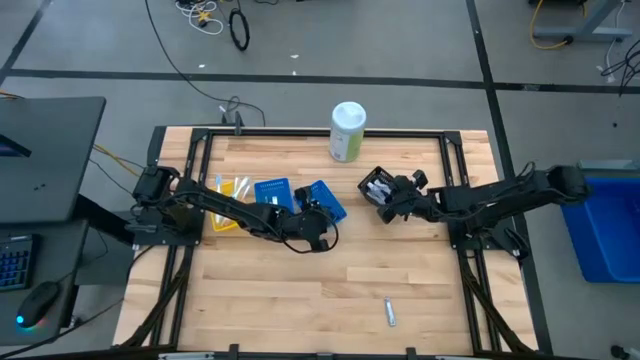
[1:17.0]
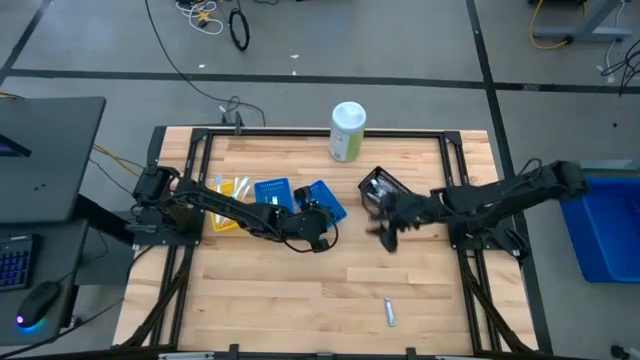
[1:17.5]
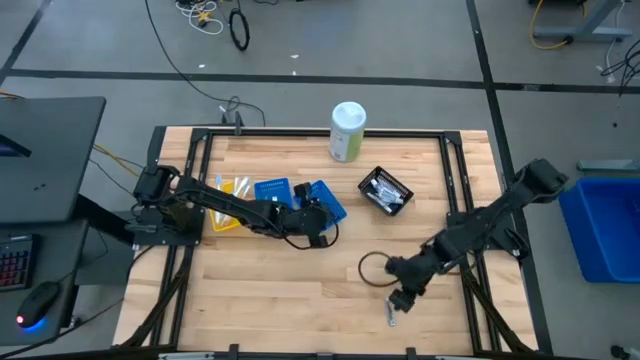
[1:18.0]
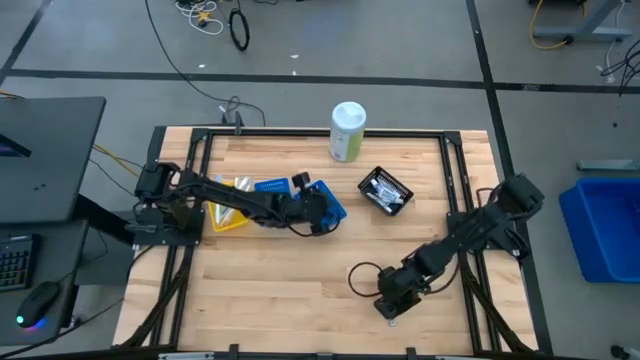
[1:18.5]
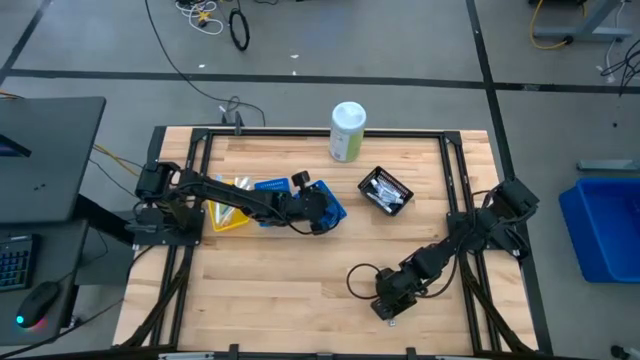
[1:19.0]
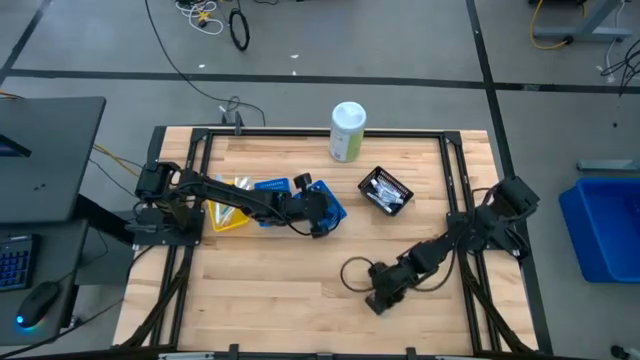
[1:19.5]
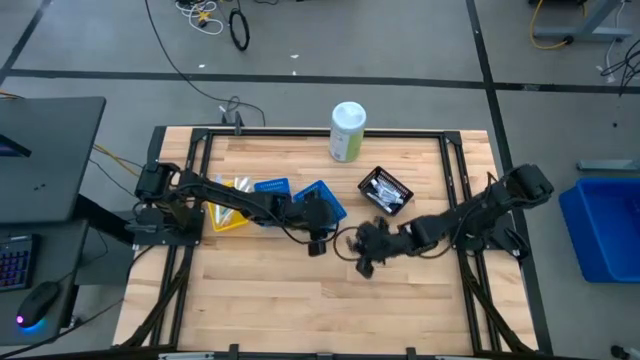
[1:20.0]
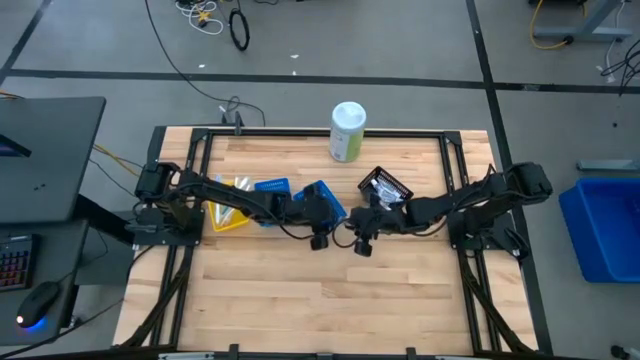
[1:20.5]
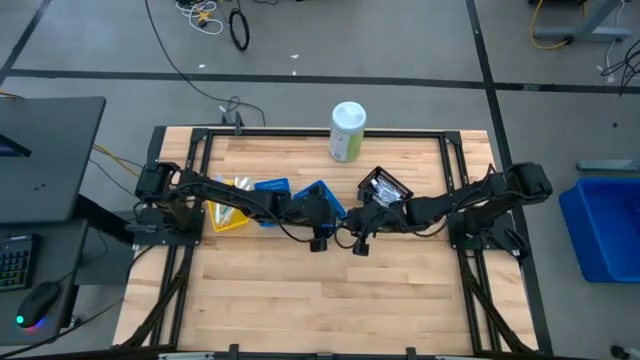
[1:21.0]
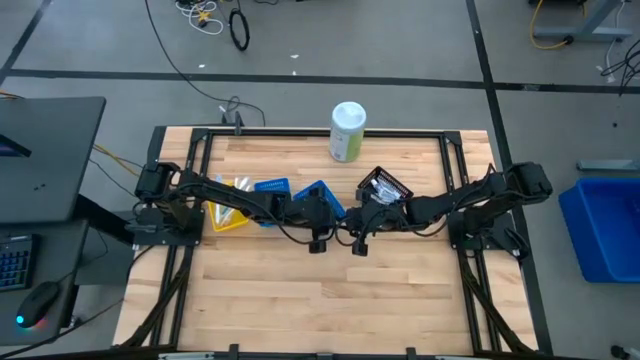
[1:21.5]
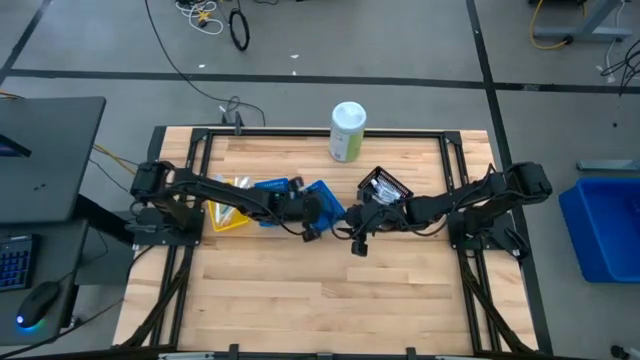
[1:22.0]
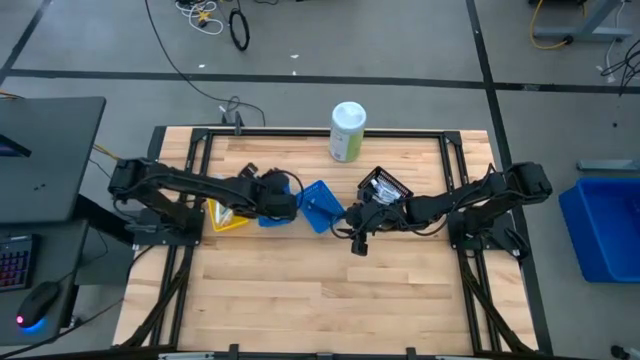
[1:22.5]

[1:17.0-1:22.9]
Task: Pick & Place Travel size toiletries
Put the silver nail cutter into the left blue bin

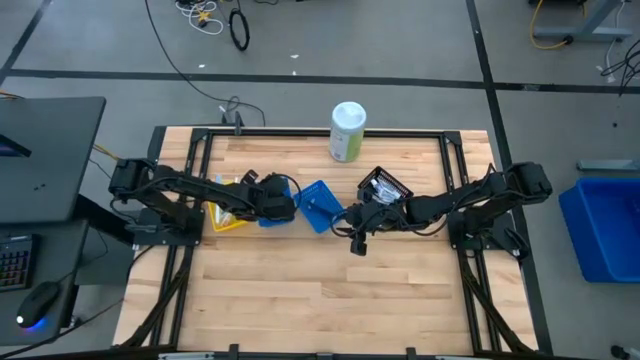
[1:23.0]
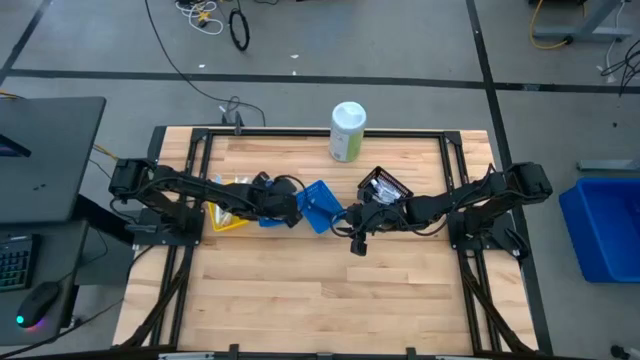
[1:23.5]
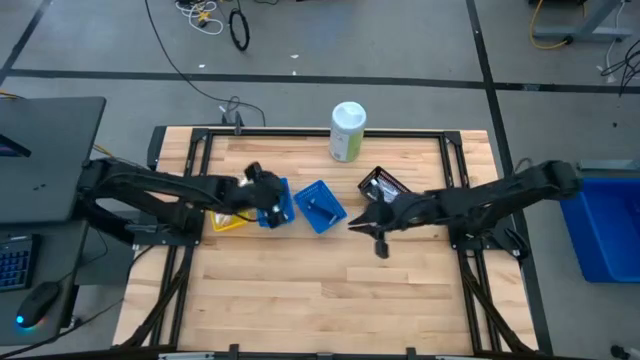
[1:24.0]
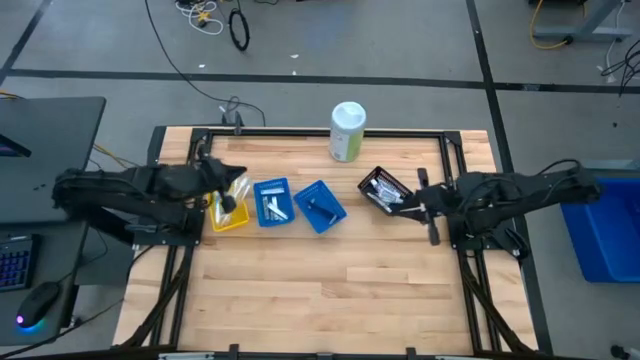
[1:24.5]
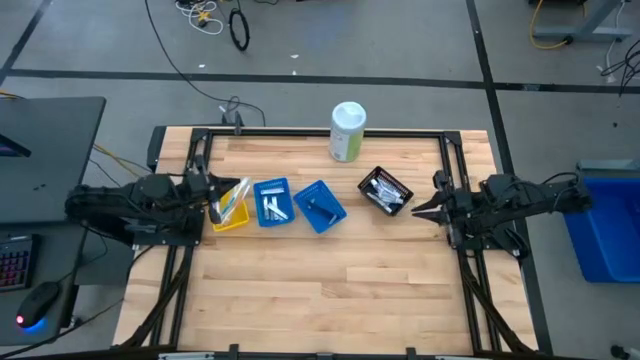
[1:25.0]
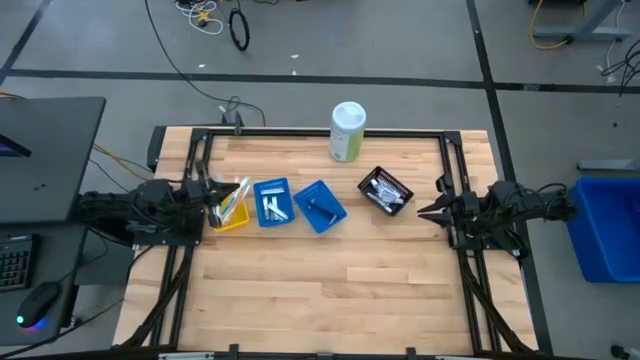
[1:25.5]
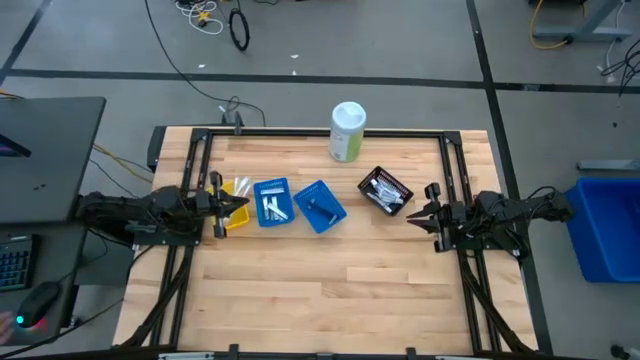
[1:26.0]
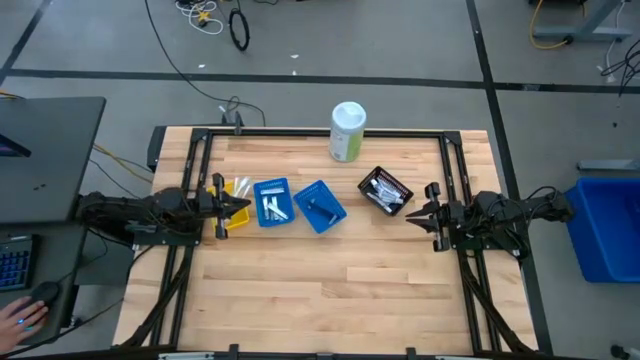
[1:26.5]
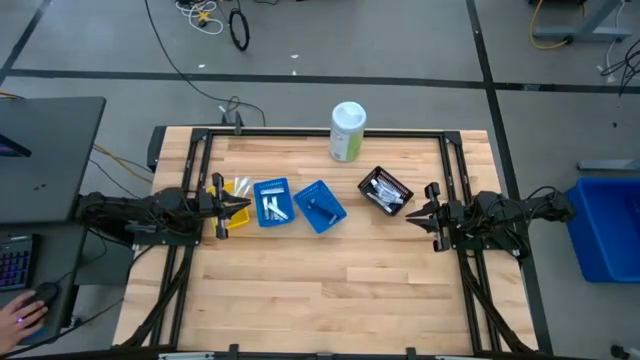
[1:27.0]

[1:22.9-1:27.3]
Return to Home Position

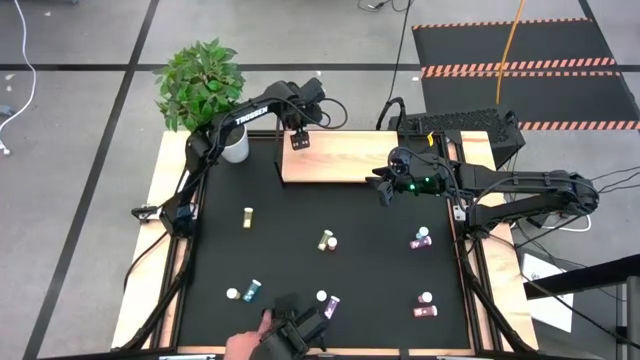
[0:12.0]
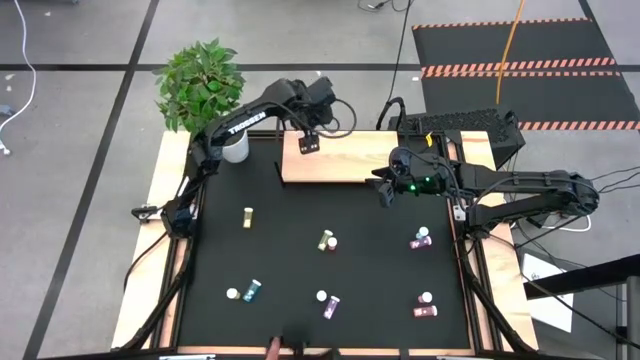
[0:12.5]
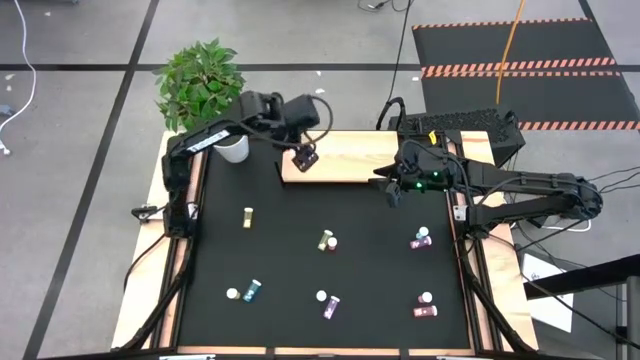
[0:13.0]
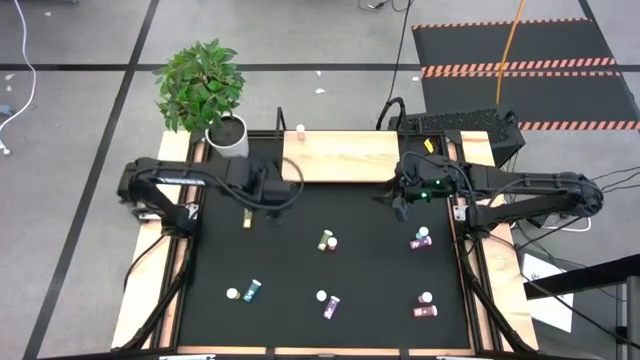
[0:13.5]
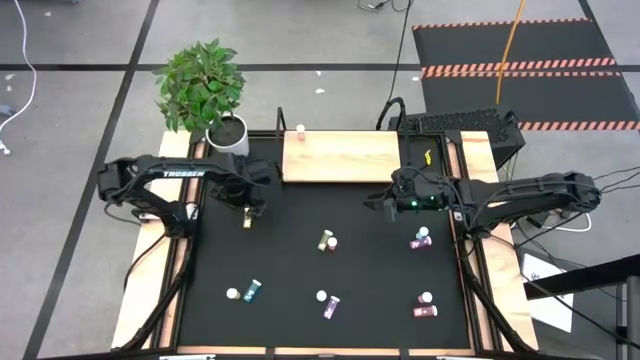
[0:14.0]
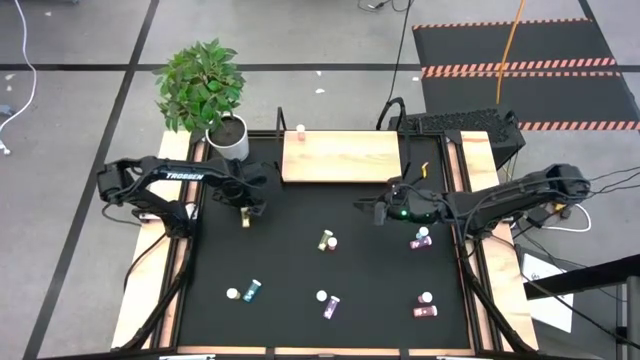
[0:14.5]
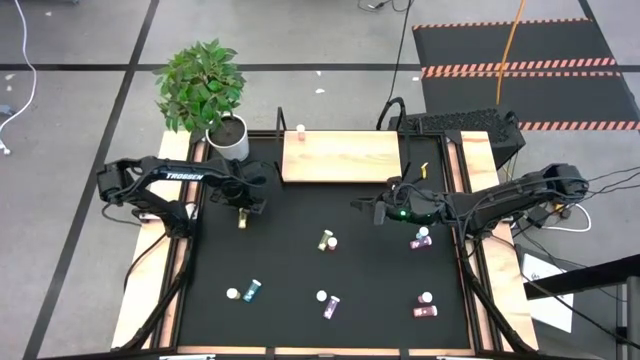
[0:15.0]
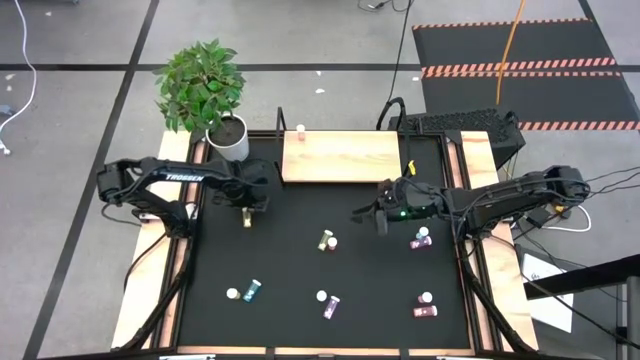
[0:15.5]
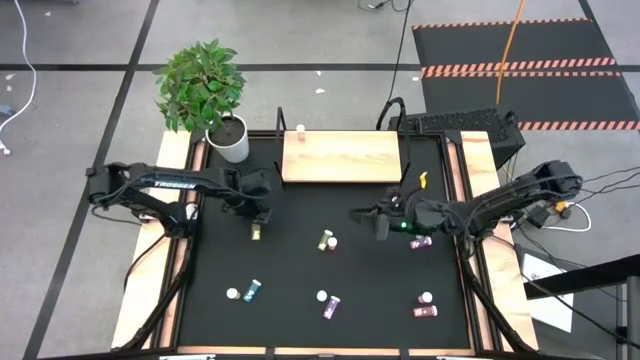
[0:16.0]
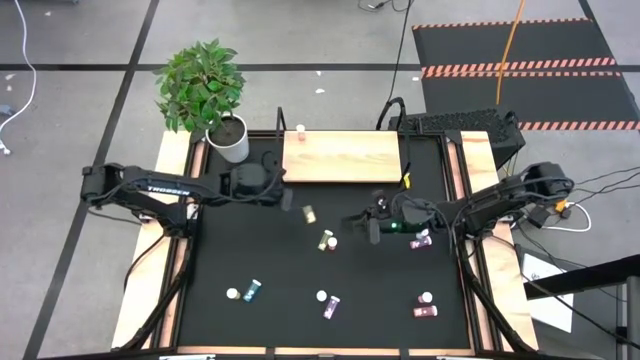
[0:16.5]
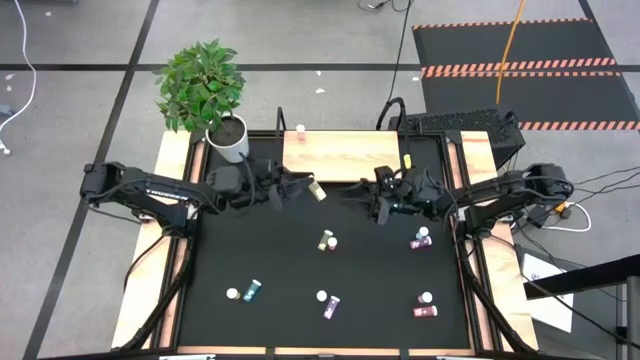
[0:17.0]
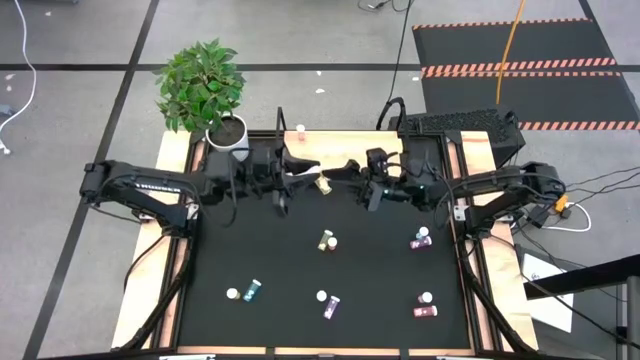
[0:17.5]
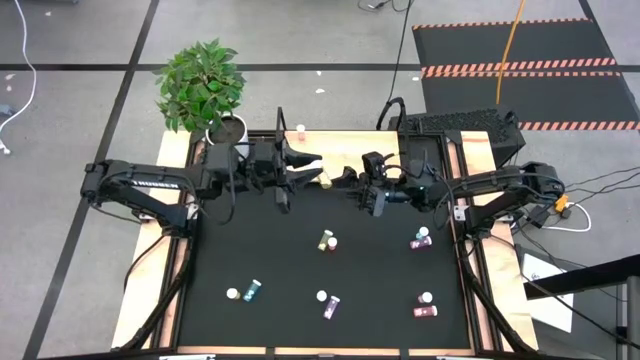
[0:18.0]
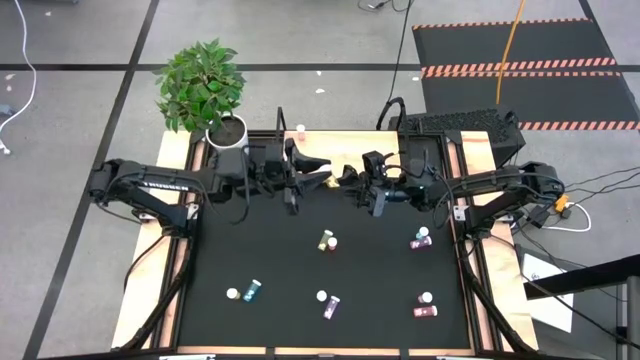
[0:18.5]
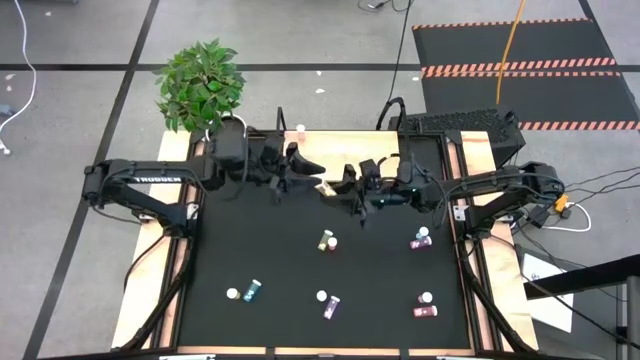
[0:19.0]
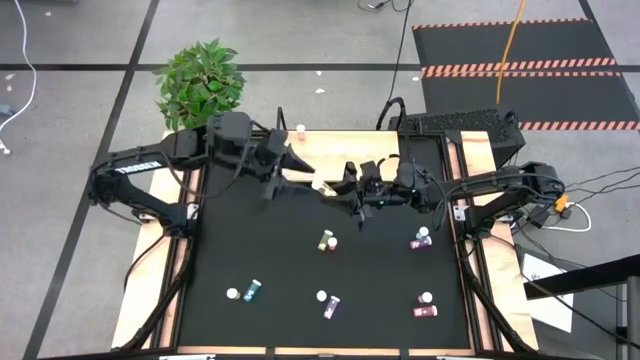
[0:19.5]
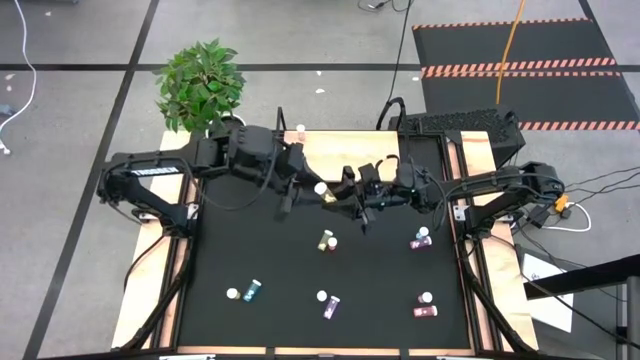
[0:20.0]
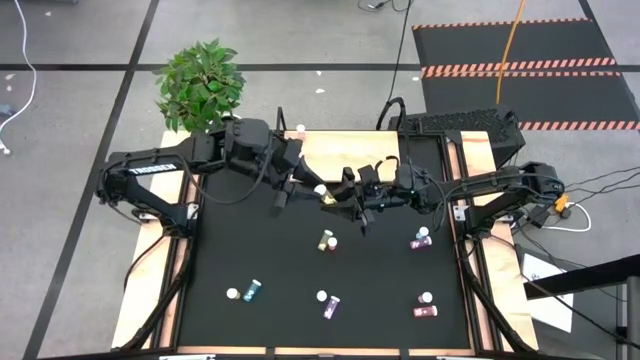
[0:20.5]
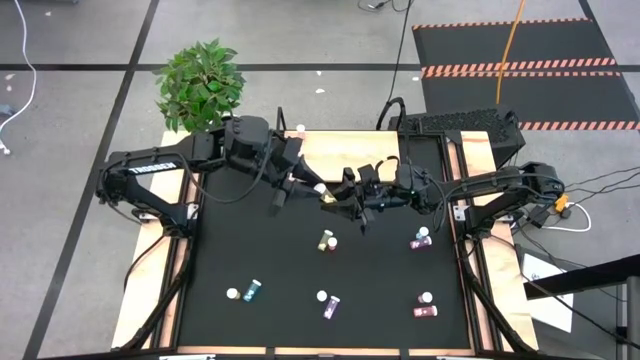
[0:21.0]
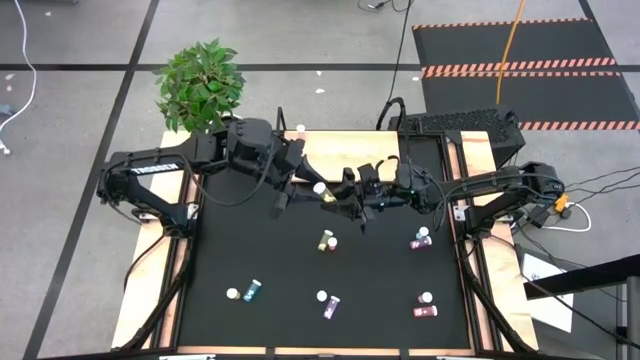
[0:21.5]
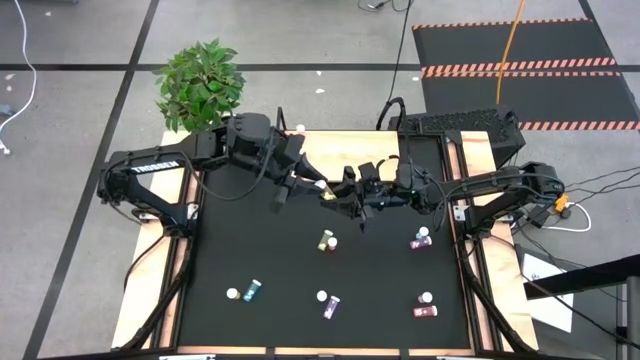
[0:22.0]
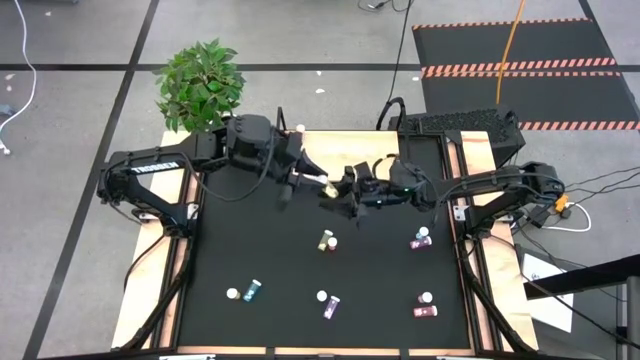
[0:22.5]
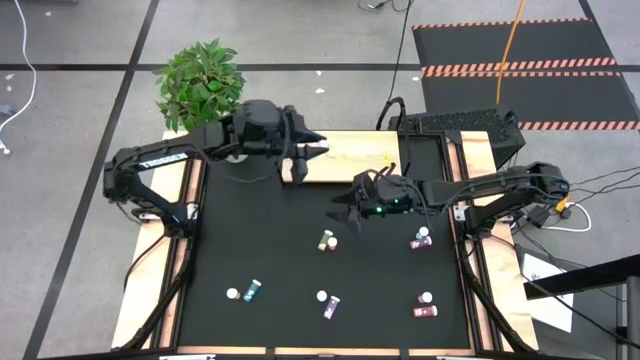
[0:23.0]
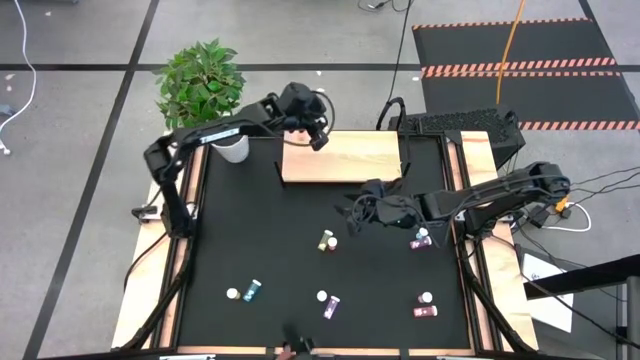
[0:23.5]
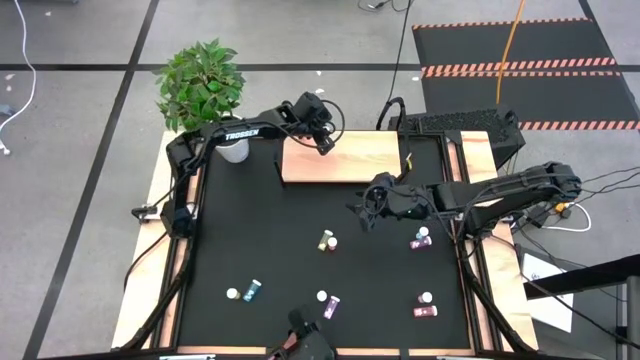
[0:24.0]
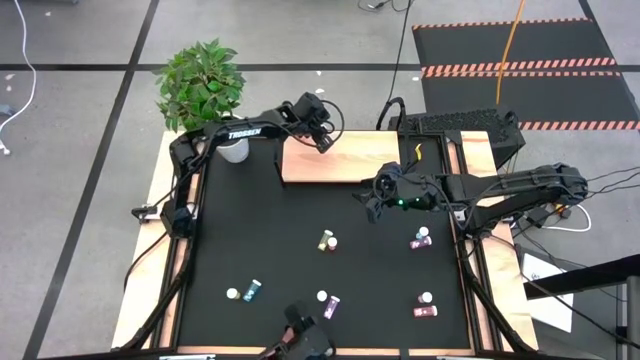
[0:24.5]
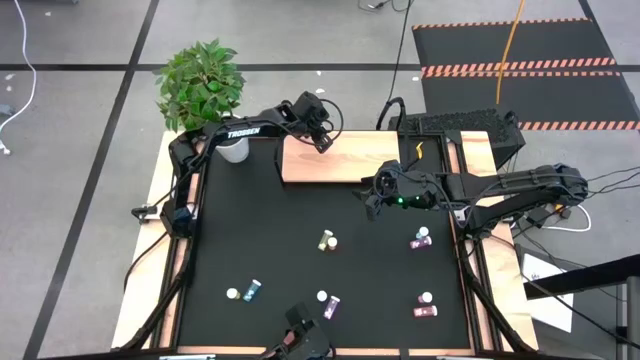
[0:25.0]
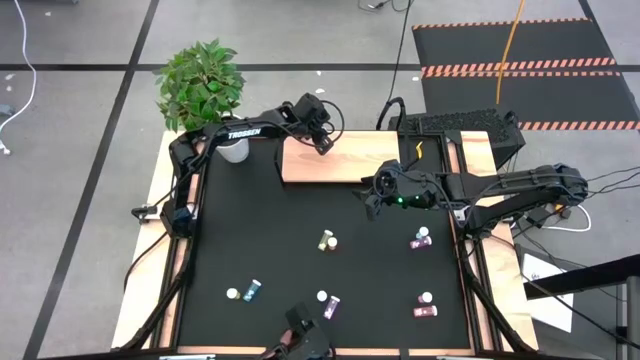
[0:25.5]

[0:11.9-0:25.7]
Task: Pick and place medicine bottles onto shelf by color
Put the top left yellow pill bottle on the shelf
